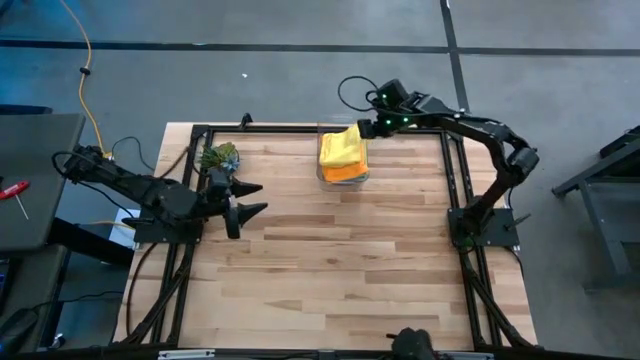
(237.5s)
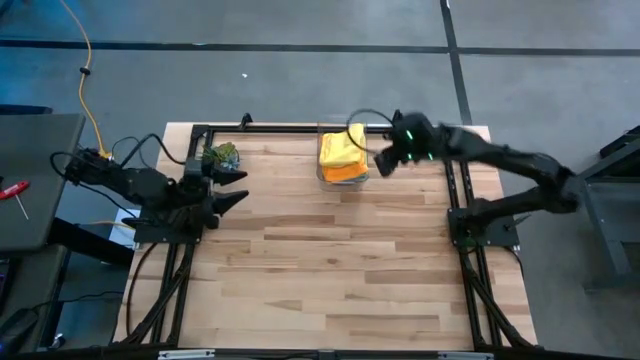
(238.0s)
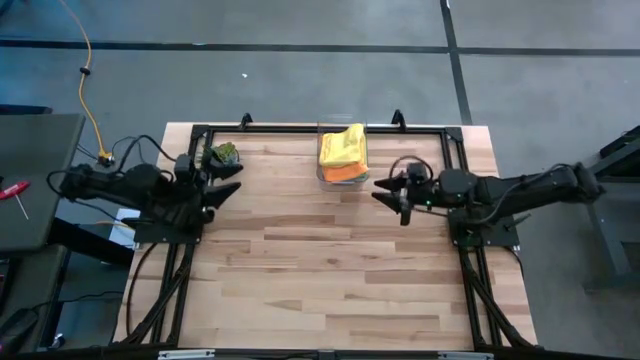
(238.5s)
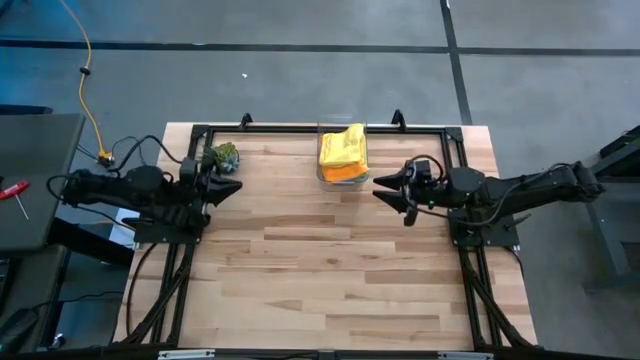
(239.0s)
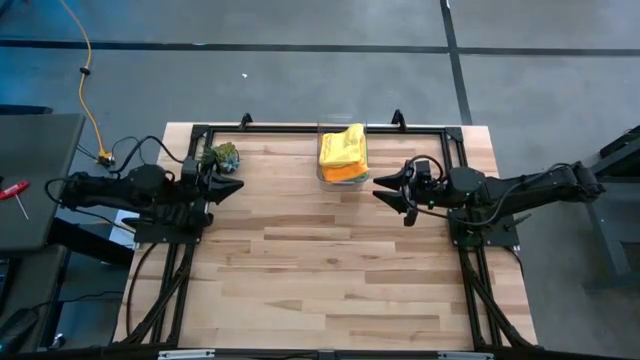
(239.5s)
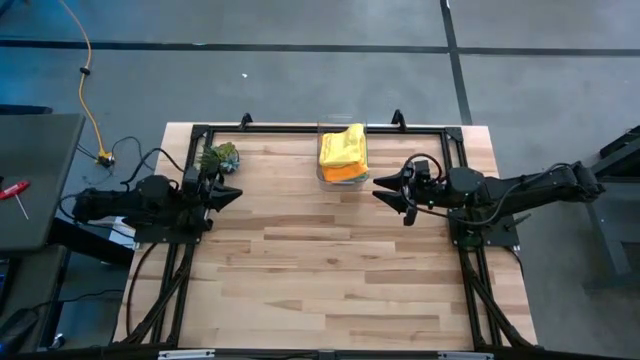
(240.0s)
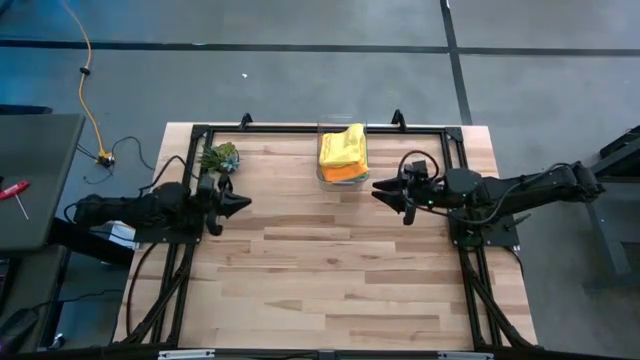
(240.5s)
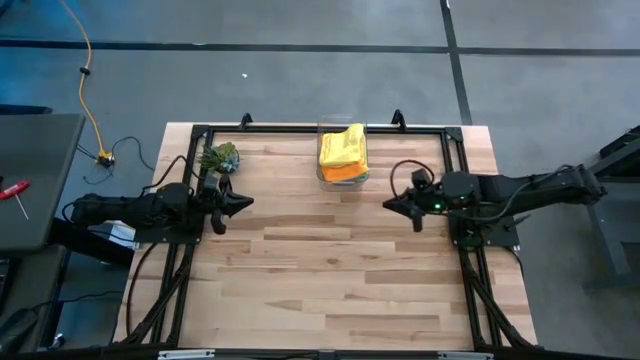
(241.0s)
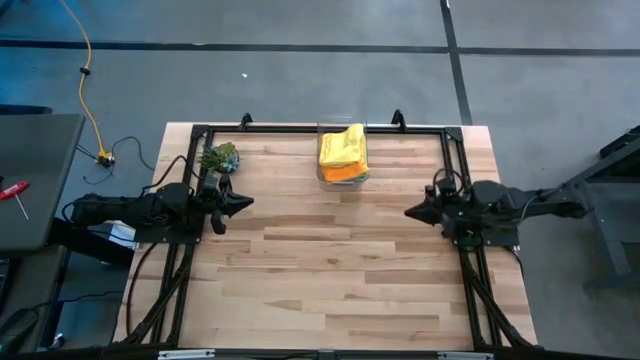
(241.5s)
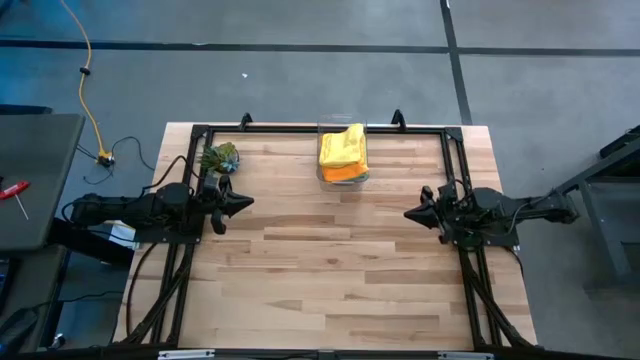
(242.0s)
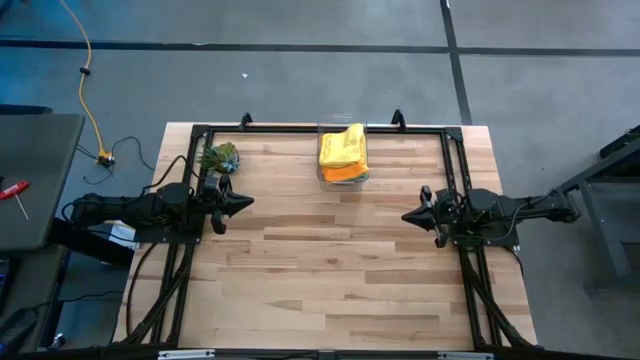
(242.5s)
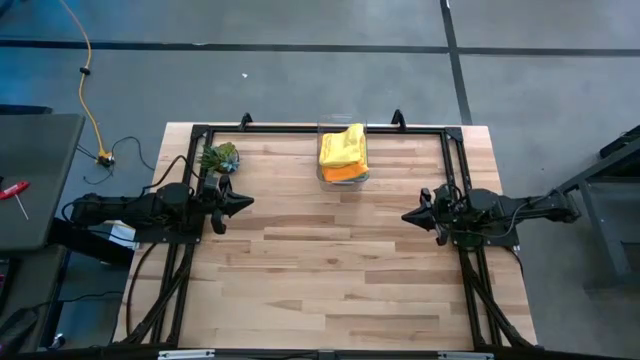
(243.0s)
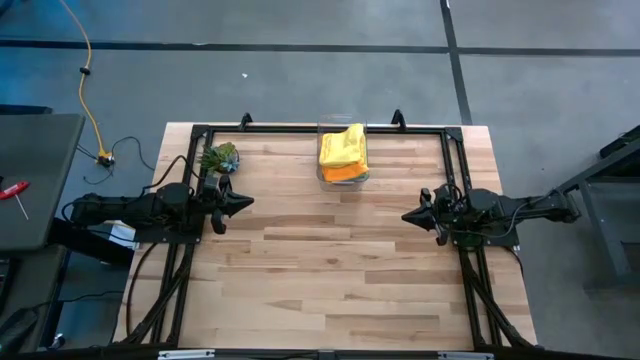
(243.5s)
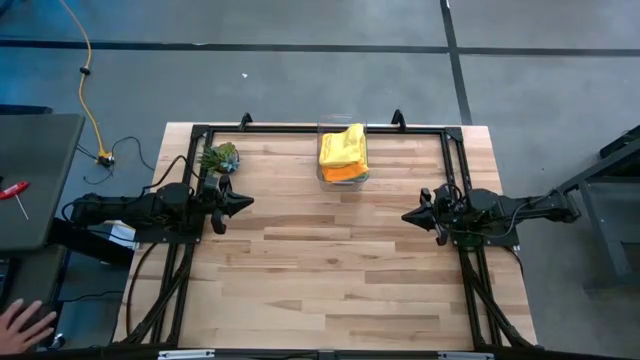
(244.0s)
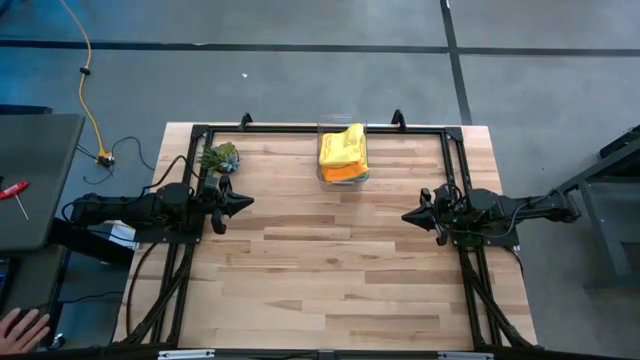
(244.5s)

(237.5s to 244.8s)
Task: Fold microfiber towels
Return to Home Position

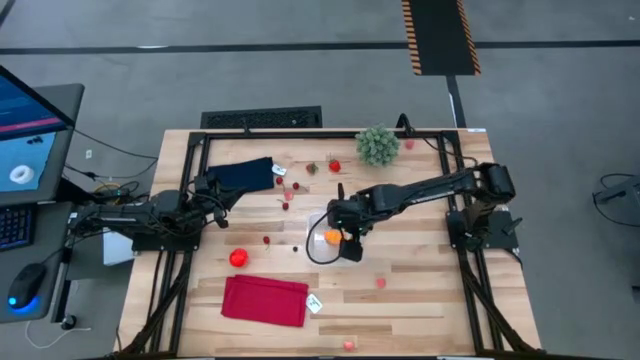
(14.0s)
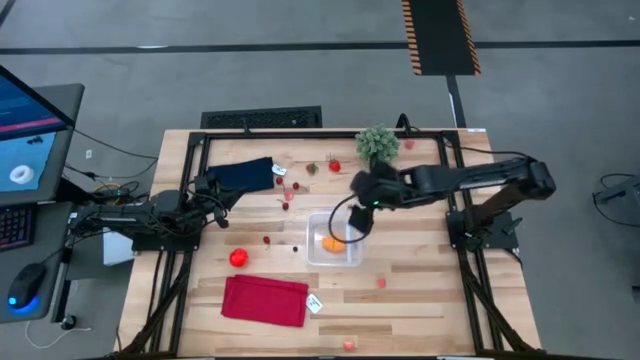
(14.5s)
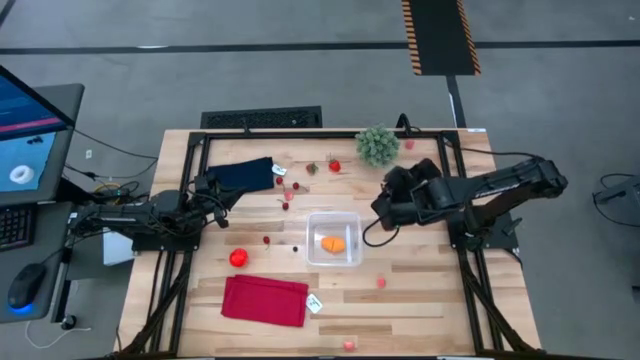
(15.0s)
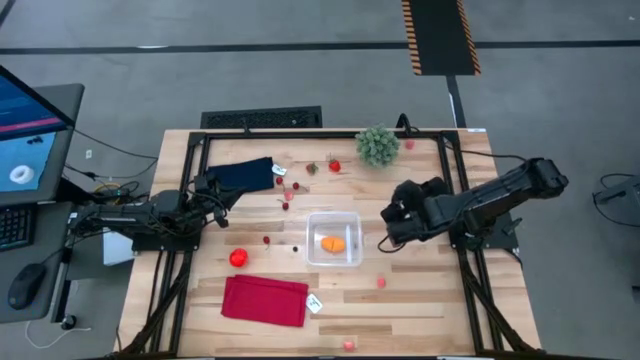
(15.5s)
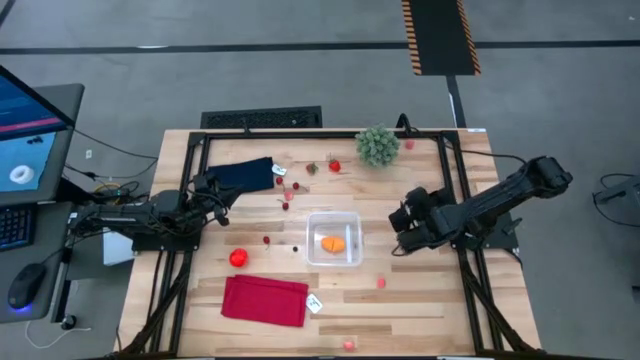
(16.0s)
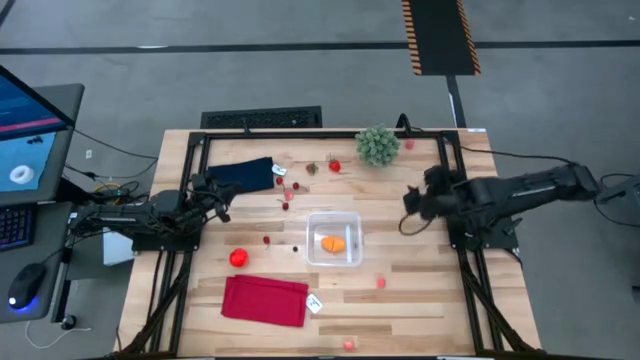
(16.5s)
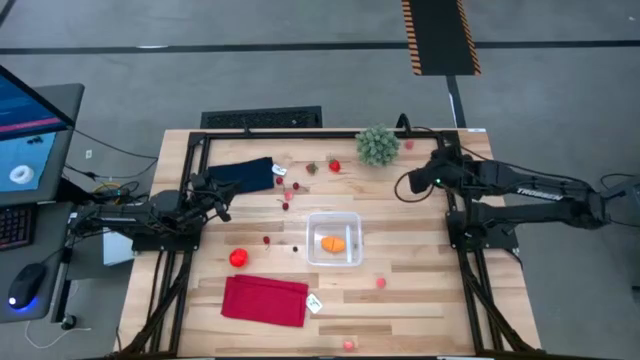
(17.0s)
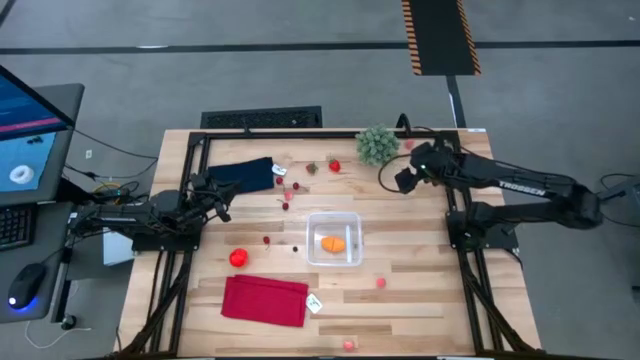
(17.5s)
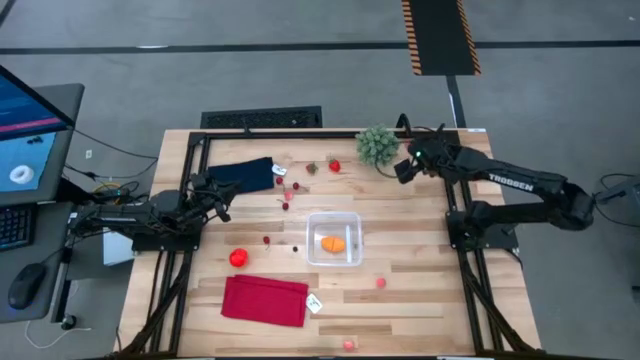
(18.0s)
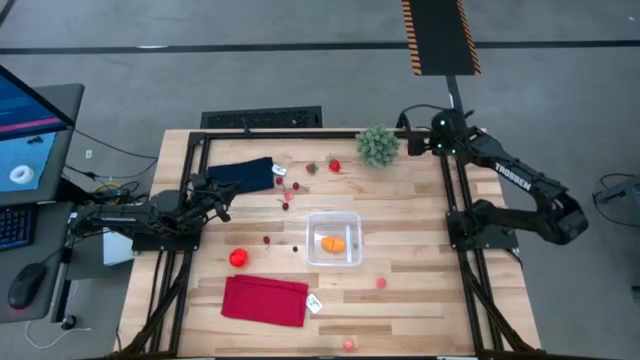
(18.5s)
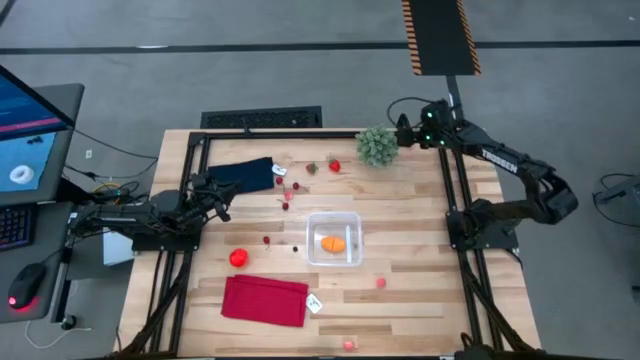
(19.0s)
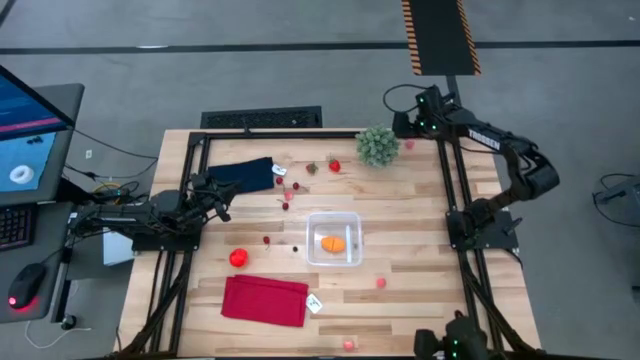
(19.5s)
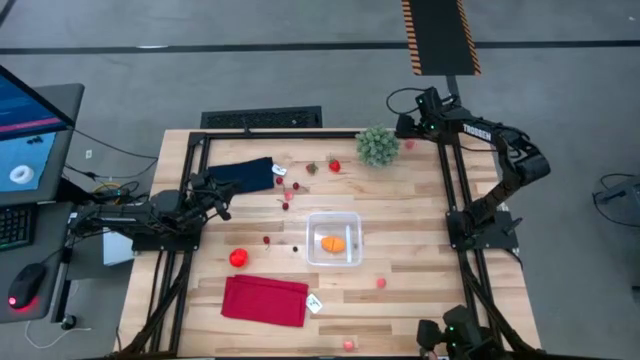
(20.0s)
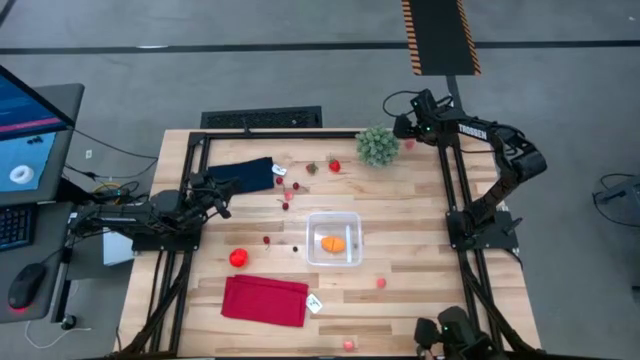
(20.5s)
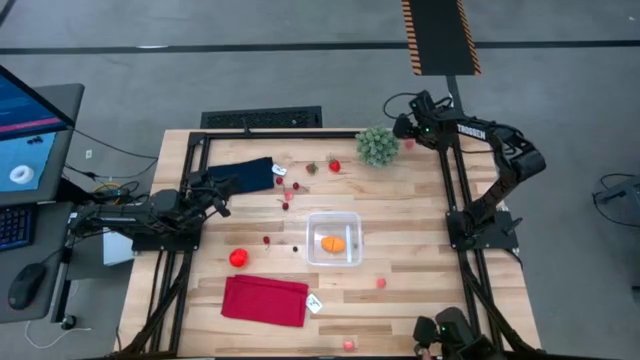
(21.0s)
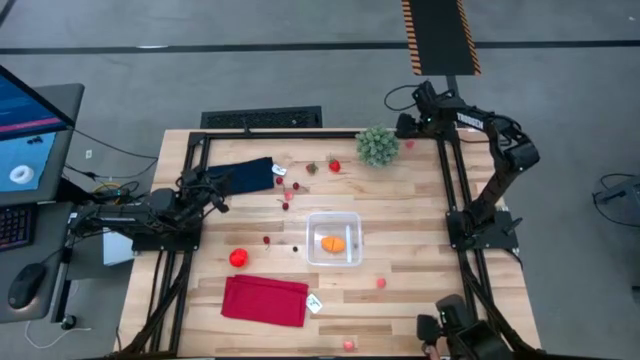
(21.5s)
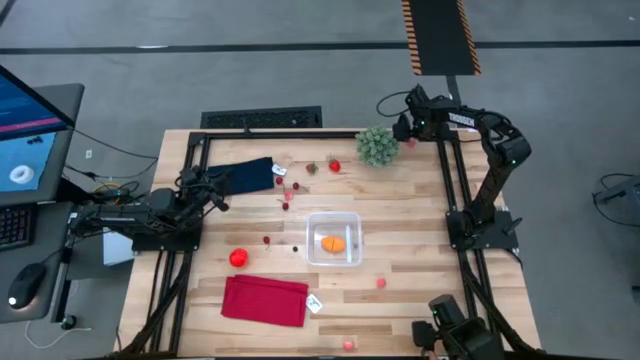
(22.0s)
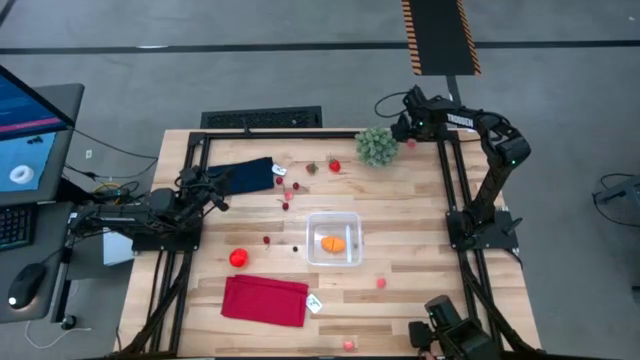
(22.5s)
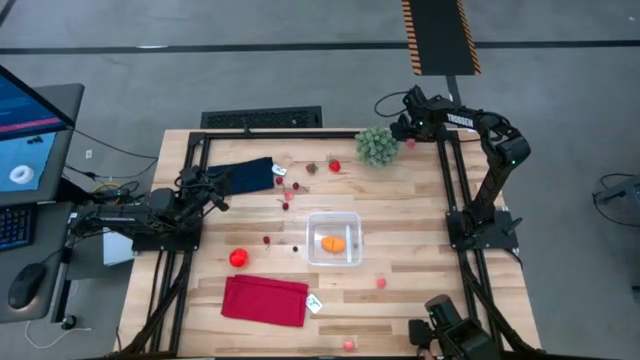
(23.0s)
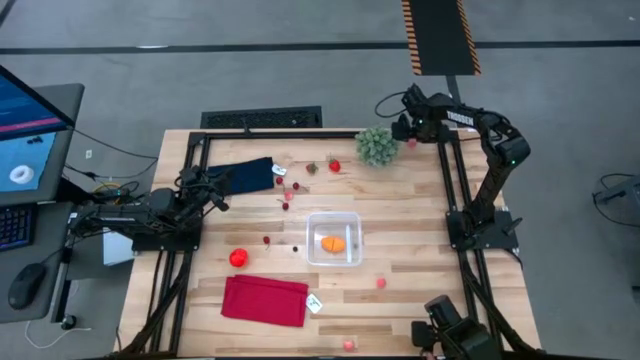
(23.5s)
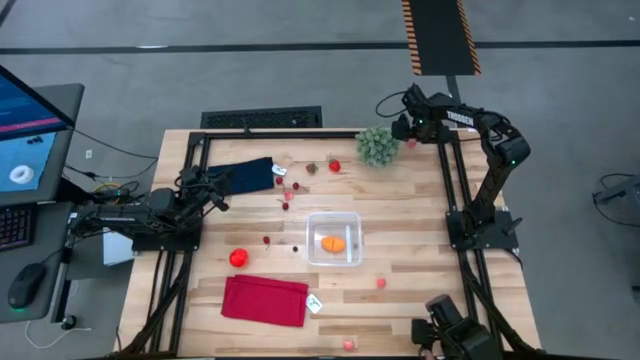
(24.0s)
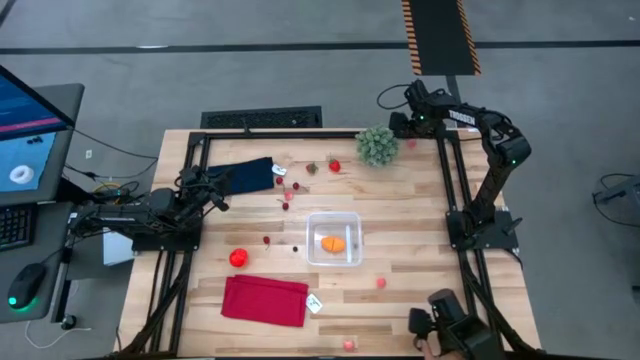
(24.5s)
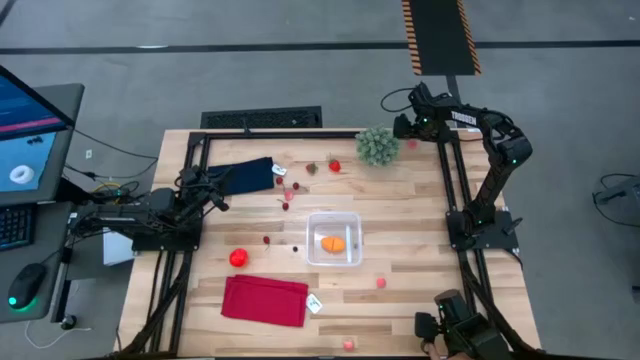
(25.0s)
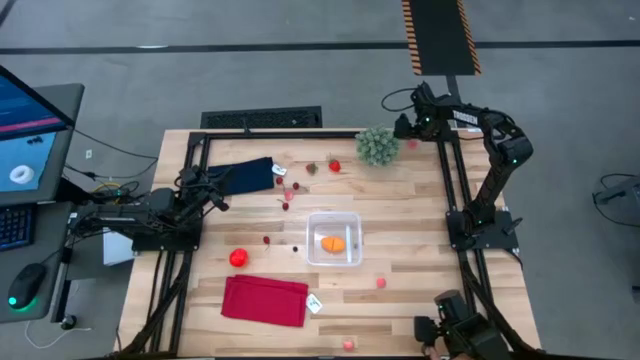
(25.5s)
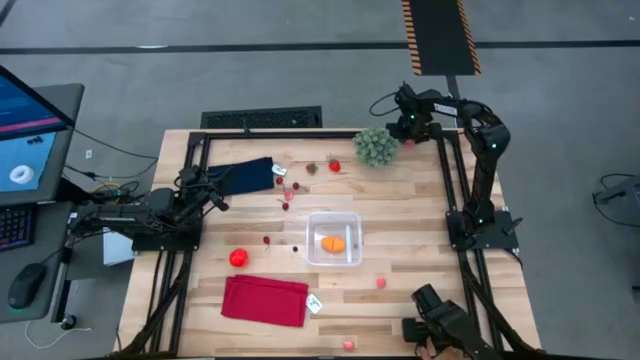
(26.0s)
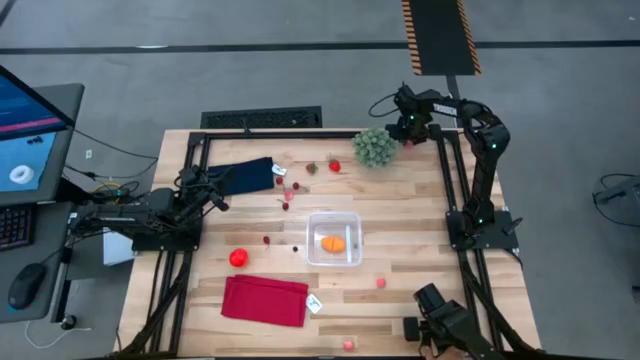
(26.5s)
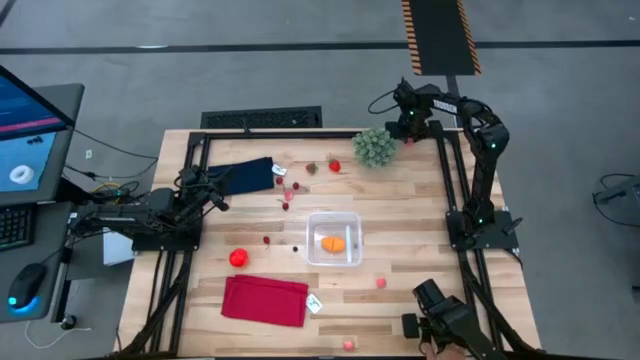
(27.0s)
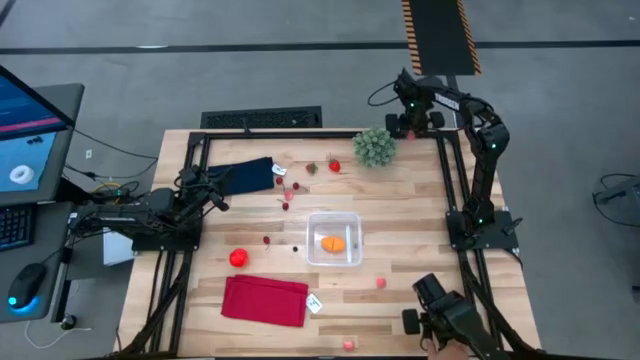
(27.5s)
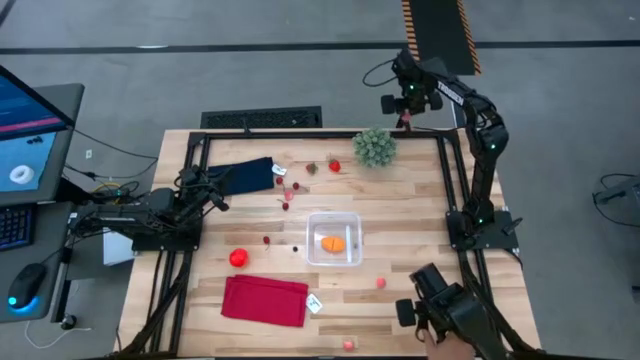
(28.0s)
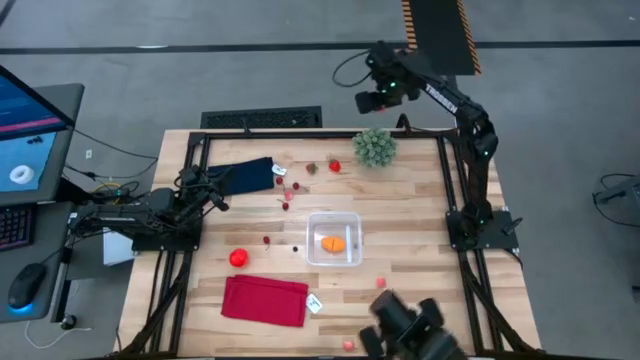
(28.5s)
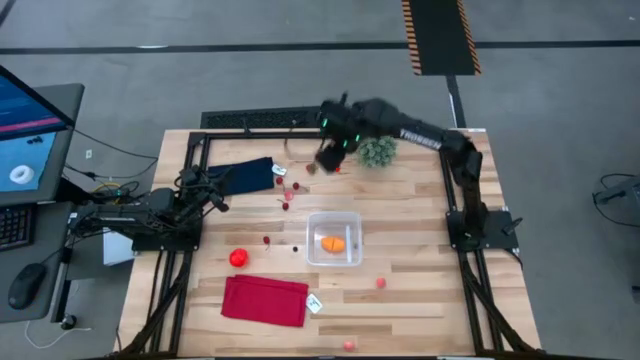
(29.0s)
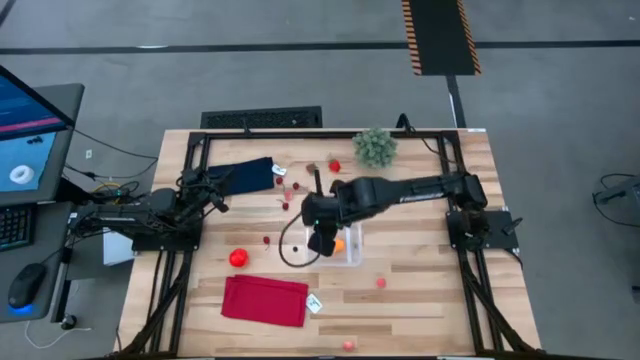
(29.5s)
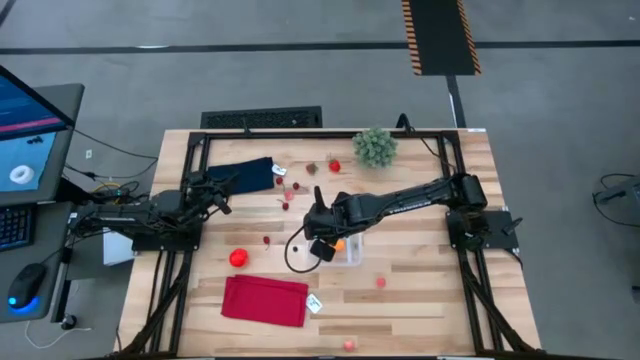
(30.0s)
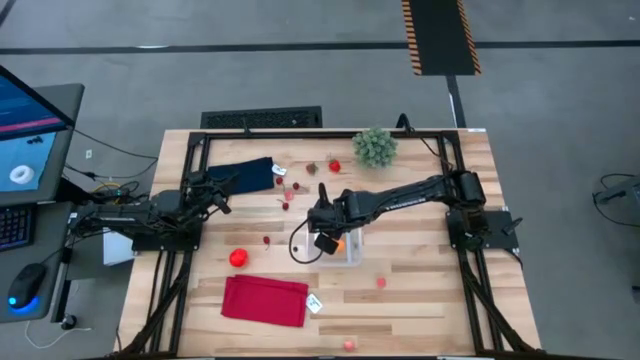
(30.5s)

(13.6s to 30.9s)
Task: Pick and placing Produce into tupperware
Put the pink peach into the transparent bin
